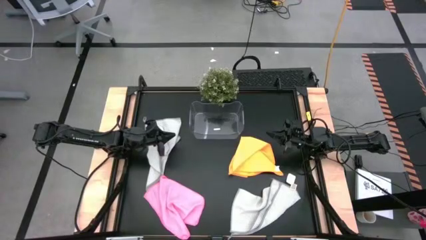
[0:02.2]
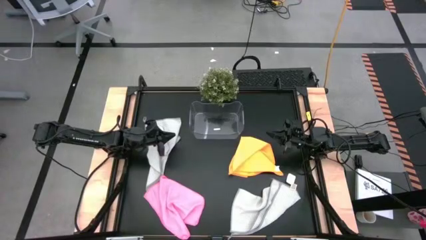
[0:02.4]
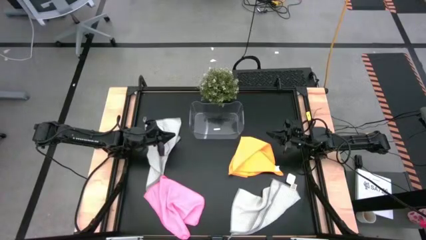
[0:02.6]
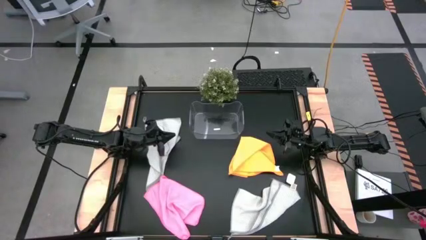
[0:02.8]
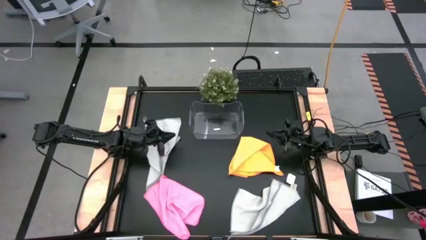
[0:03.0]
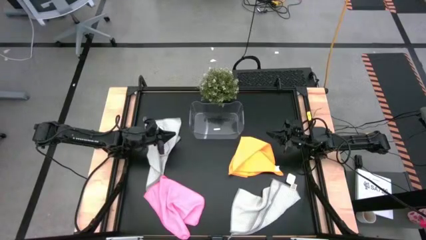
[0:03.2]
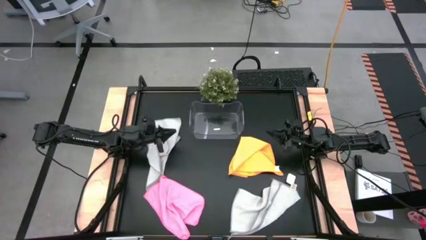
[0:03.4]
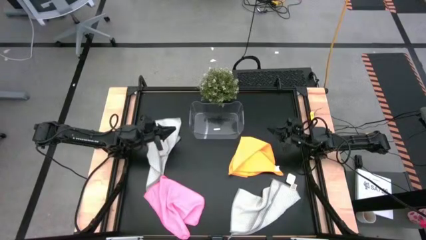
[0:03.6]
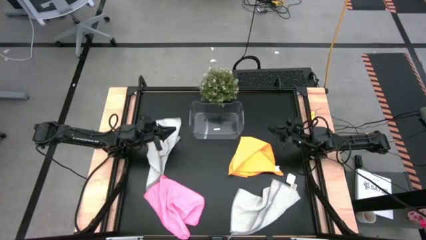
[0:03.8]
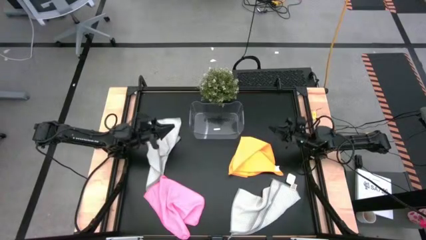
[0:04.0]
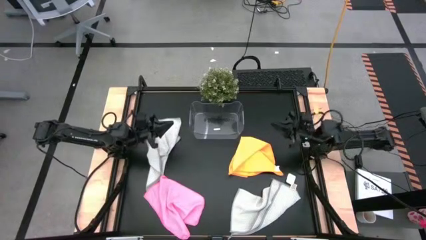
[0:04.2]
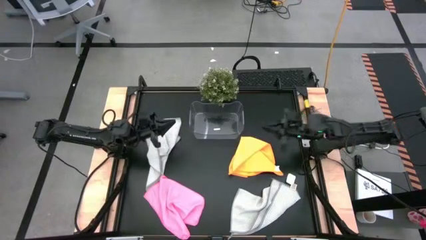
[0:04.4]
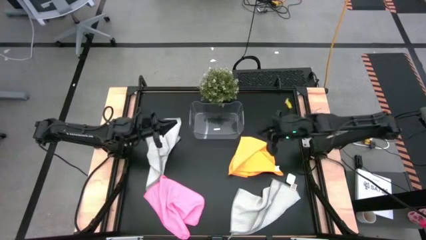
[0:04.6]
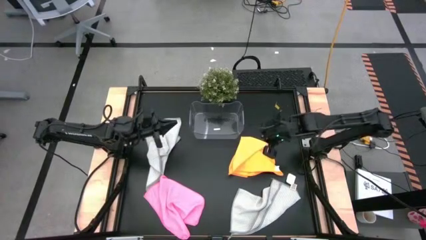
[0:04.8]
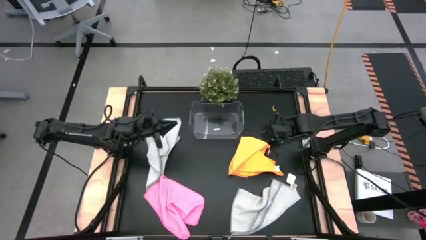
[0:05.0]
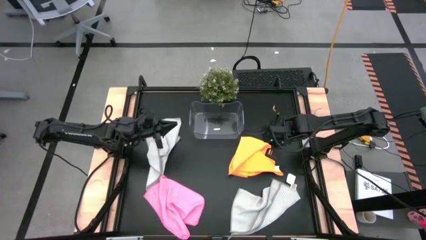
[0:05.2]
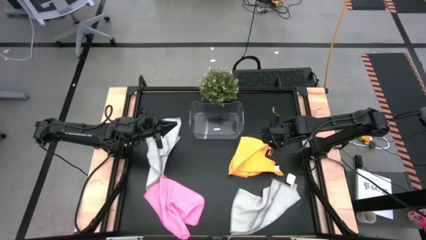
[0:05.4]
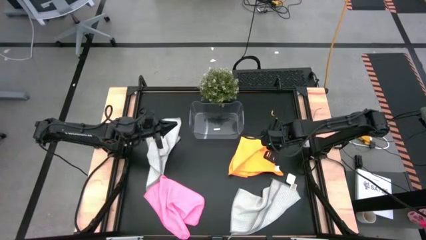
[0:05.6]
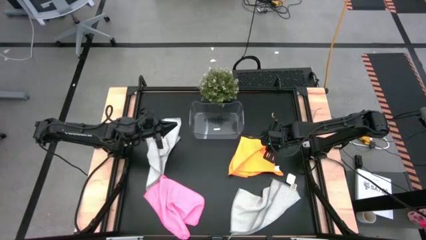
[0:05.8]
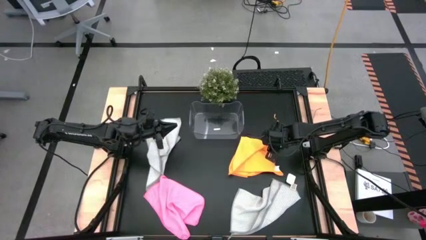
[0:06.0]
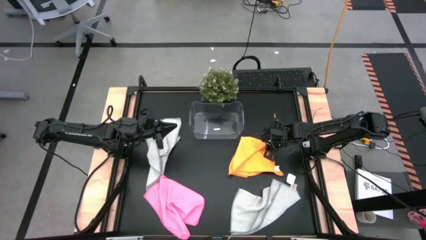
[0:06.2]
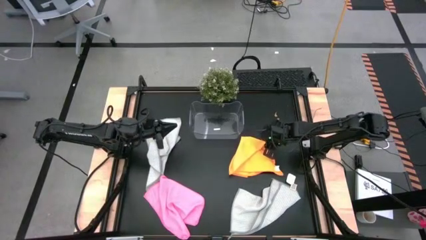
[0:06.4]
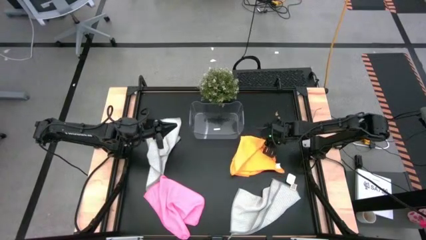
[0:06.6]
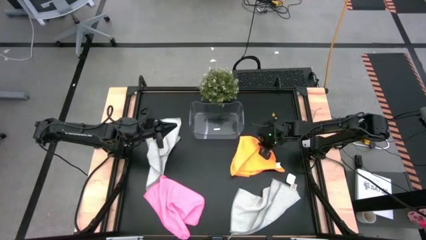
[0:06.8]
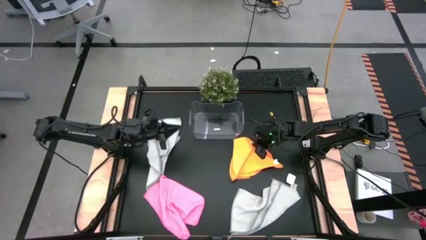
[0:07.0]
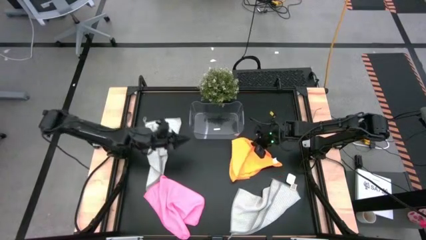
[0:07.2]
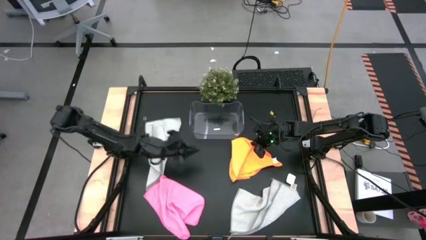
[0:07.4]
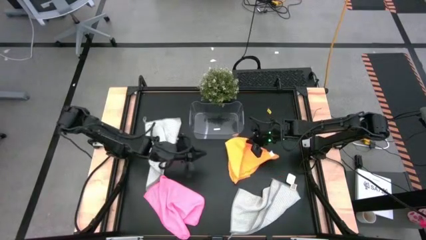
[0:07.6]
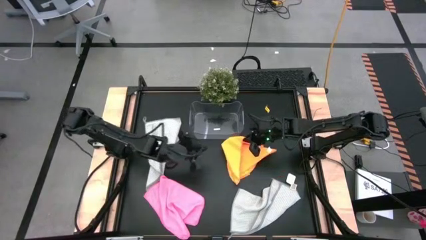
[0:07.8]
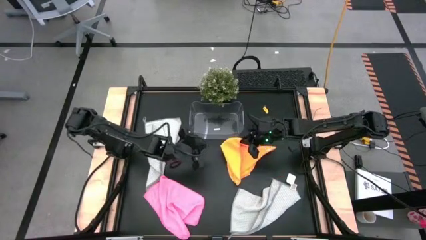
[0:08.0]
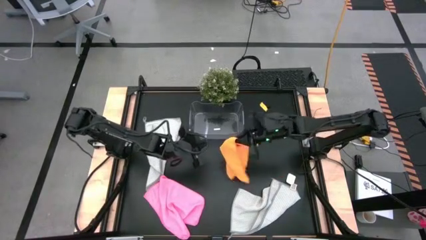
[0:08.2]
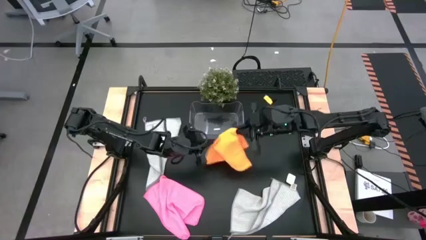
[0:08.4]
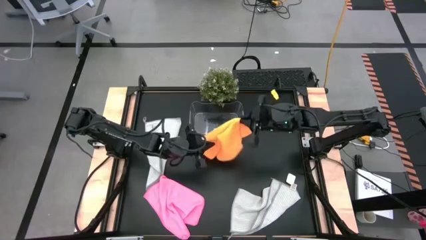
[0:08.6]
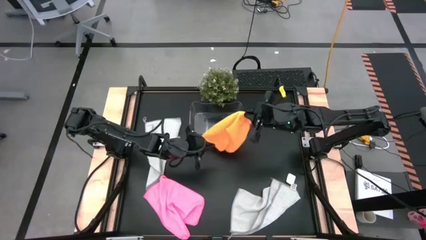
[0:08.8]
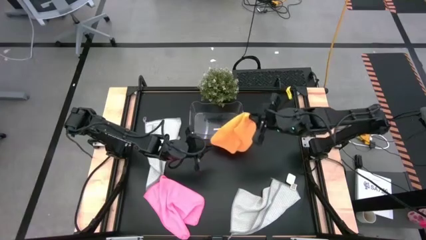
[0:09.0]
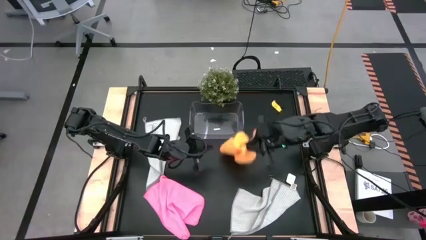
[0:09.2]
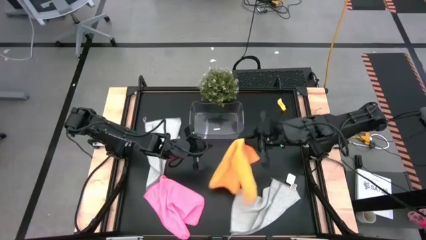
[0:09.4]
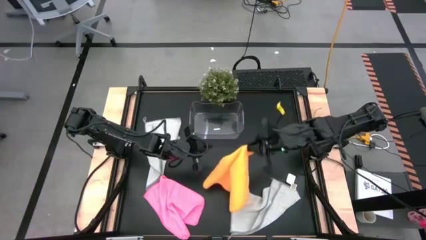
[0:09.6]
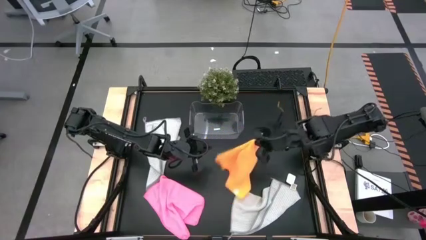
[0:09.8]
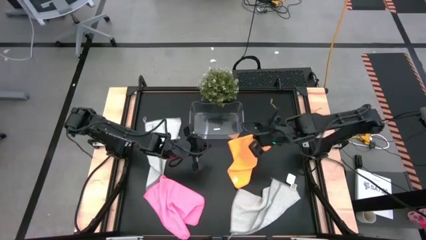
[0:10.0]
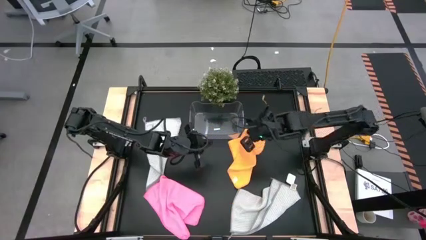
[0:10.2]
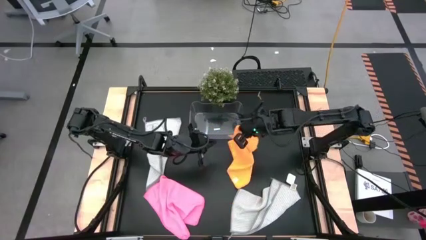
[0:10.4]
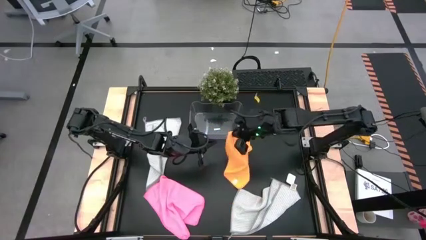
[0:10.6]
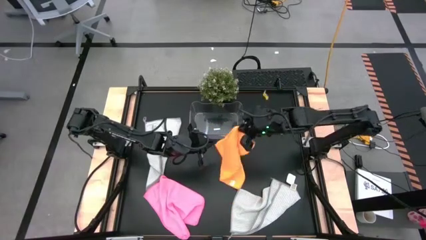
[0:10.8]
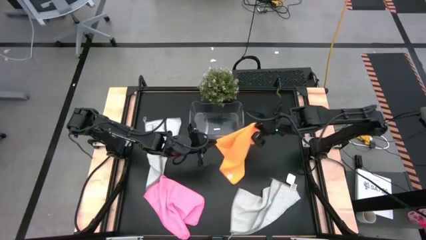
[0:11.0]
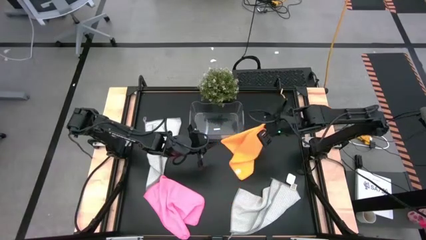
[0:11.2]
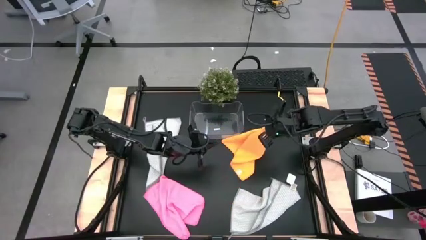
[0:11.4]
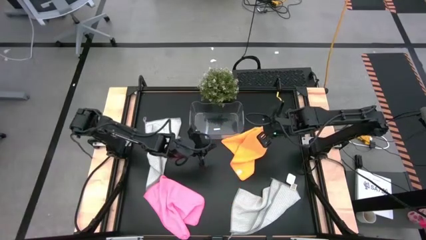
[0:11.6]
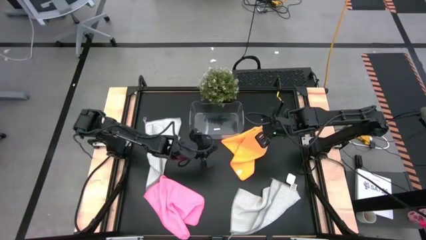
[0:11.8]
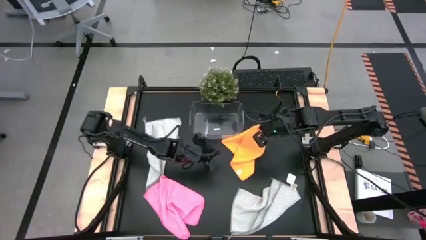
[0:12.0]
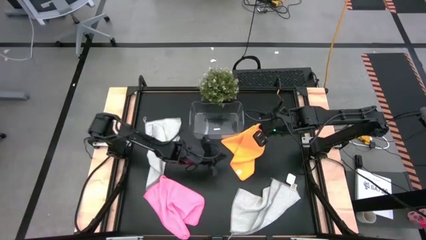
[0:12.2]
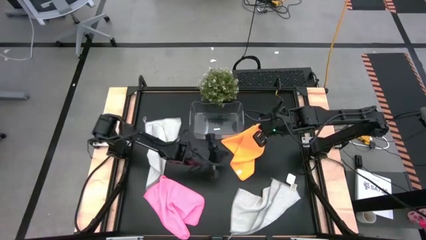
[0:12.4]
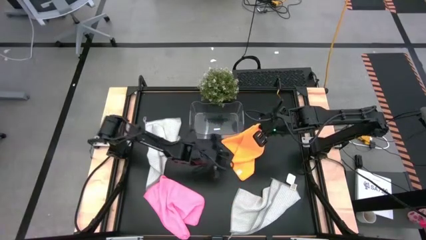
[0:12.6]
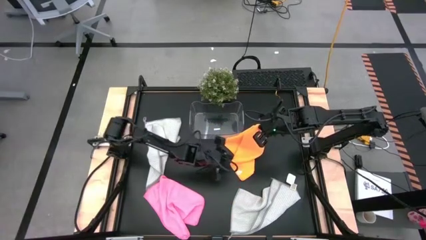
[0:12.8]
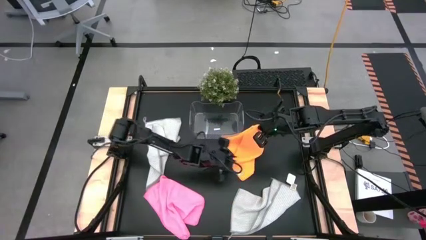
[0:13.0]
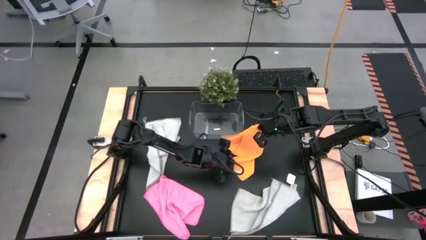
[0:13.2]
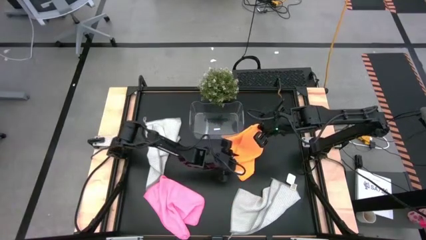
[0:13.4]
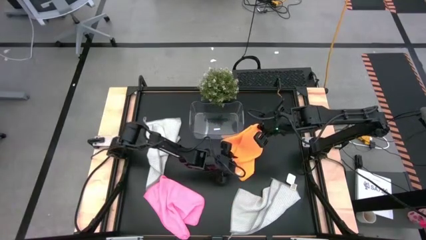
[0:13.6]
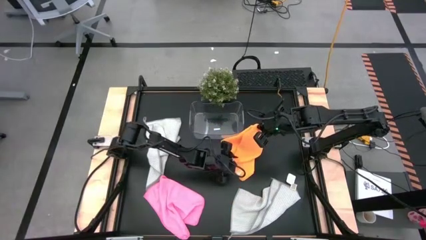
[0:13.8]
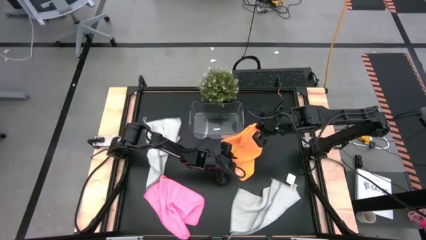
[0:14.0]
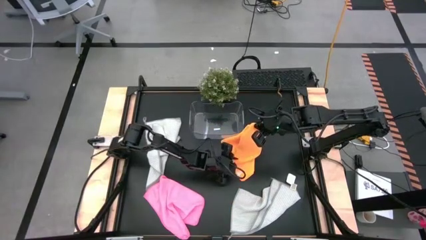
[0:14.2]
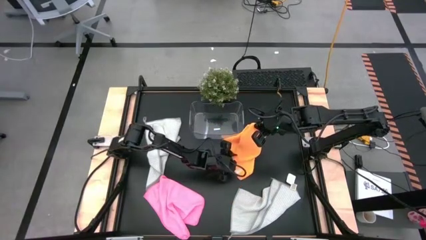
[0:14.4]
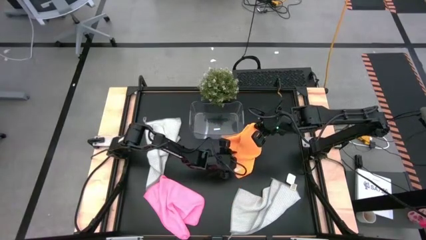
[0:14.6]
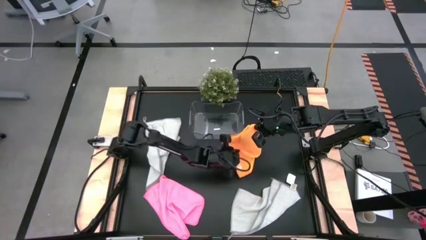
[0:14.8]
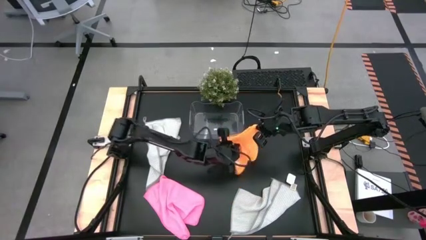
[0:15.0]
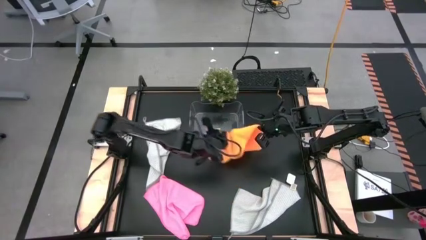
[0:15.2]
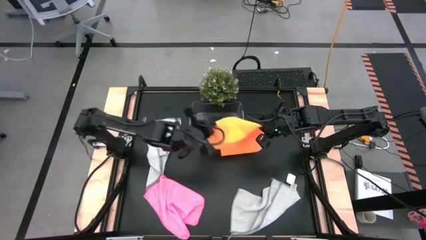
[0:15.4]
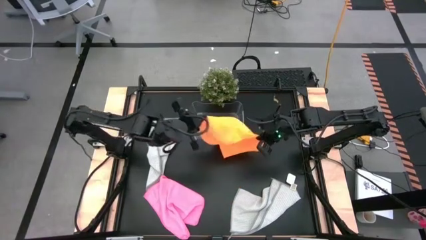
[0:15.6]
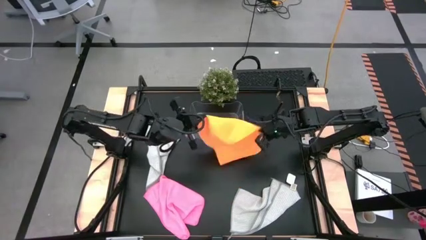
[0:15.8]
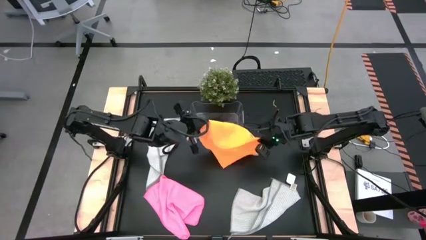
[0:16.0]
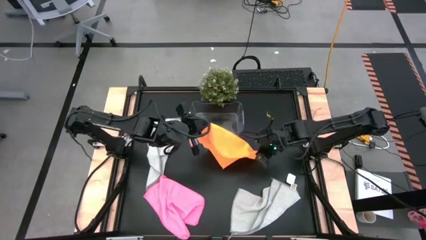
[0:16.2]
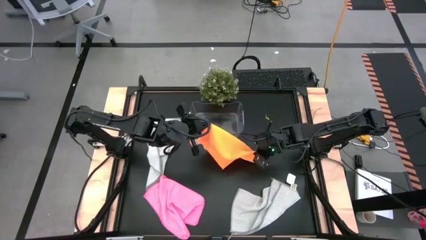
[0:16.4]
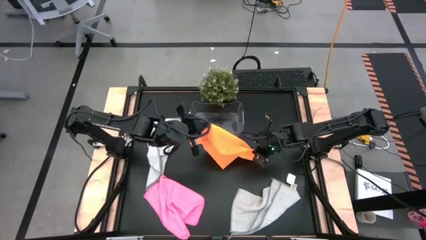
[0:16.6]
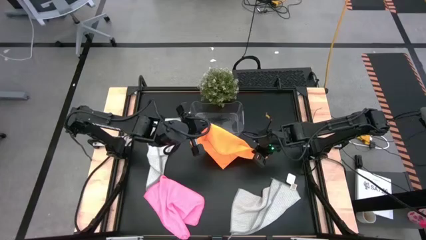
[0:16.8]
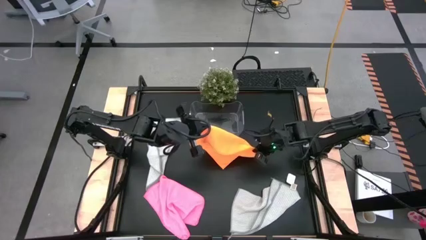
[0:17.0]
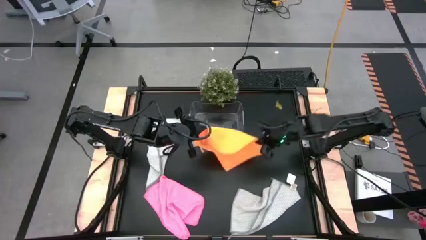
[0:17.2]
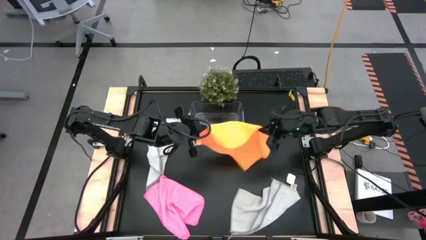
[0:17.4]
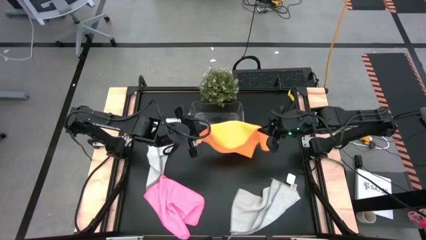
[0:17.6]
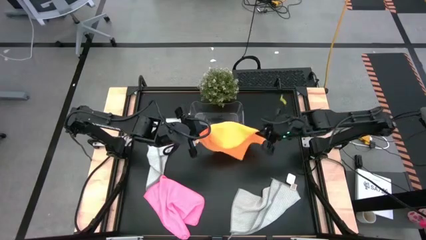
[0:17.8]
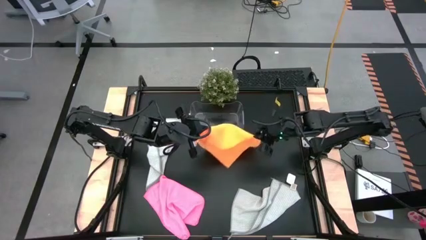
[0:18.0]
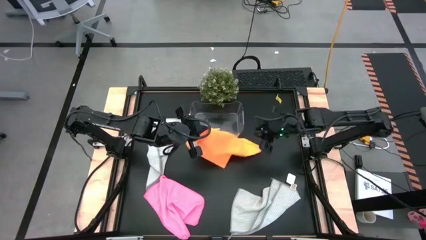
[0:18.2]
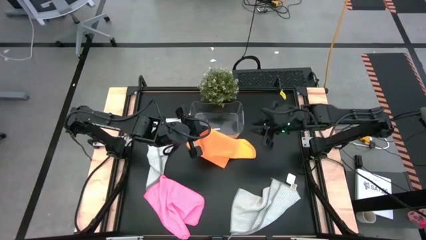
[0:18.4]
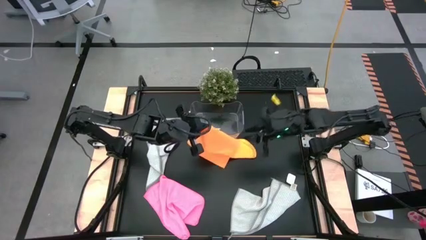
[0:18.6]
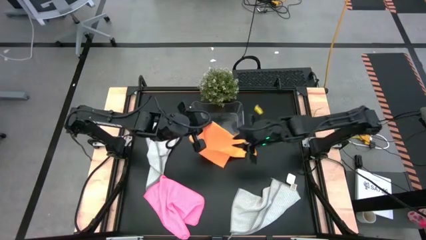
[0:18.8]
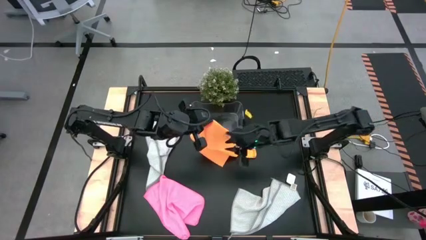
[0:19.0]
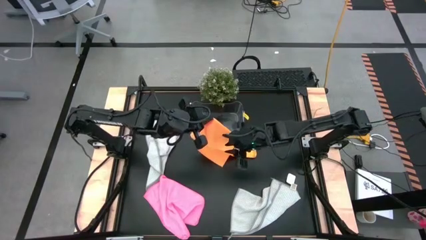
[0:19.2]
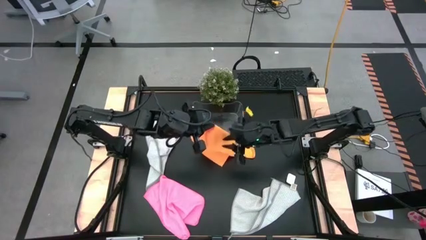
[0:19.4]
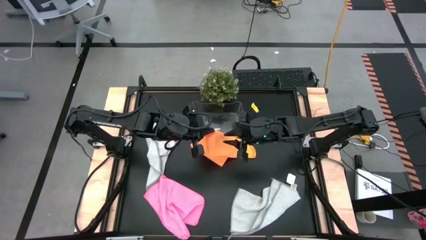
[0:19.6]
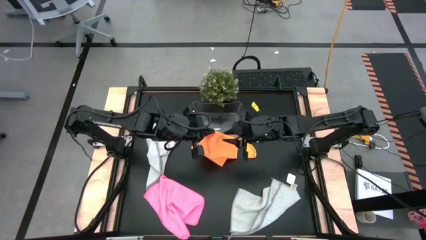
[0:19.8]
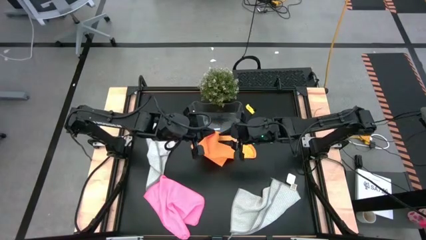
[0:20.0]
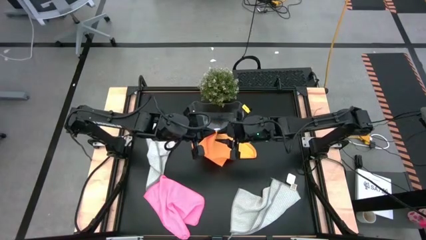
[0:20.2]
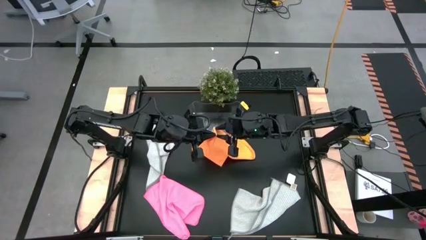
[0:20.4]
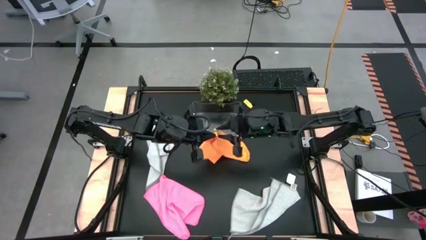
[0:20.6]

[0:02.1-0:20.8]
Task: Fold microfiber towels
Fold the orange microfiber towel on the table
